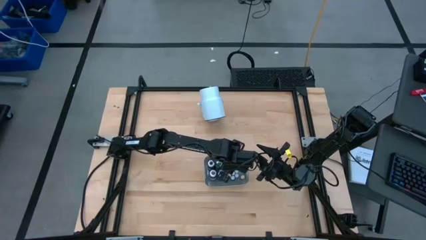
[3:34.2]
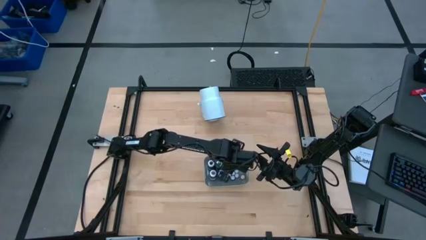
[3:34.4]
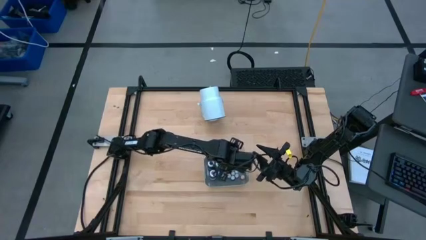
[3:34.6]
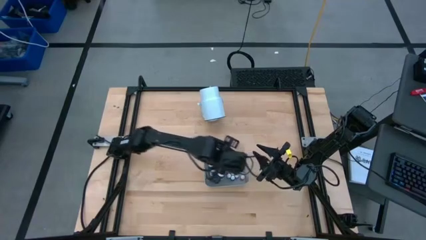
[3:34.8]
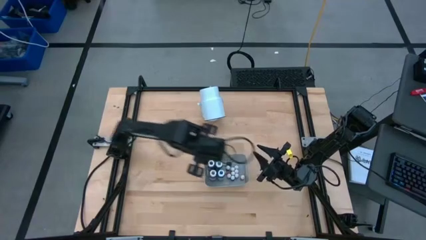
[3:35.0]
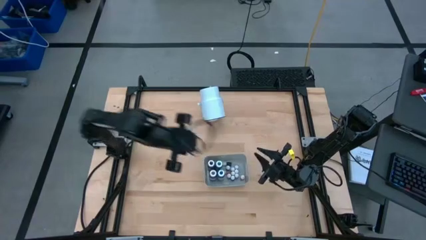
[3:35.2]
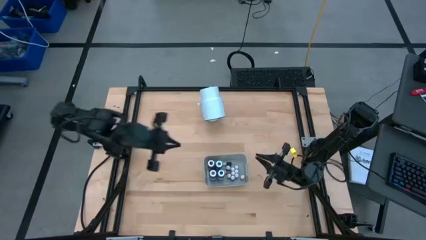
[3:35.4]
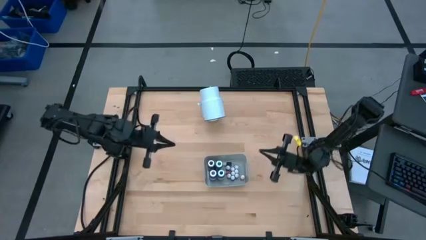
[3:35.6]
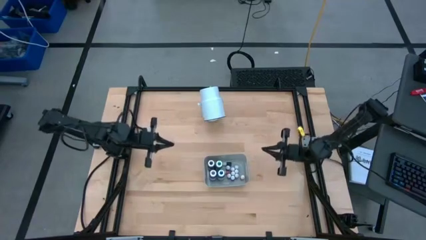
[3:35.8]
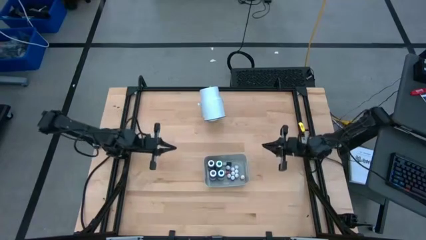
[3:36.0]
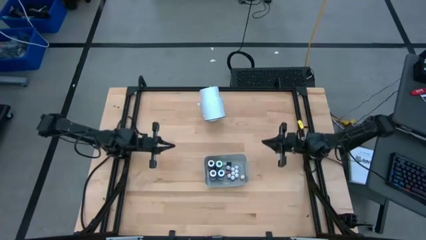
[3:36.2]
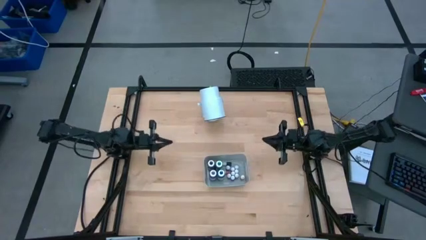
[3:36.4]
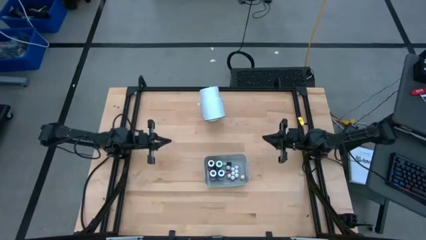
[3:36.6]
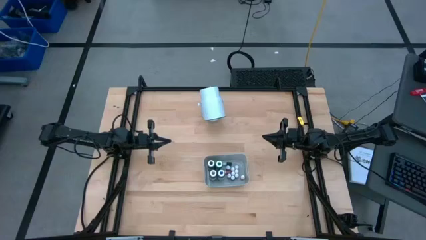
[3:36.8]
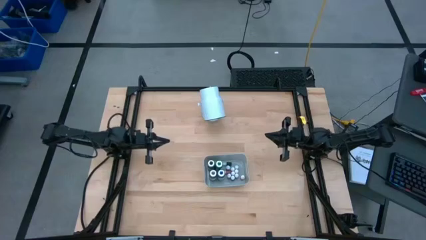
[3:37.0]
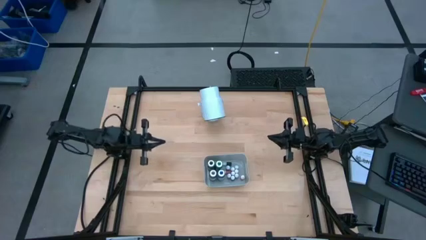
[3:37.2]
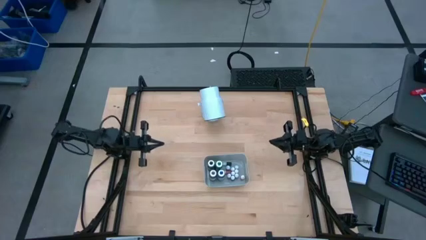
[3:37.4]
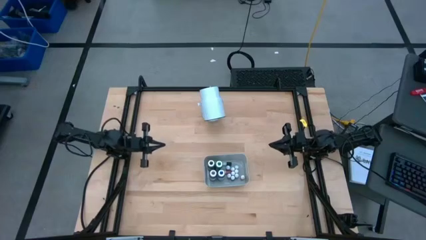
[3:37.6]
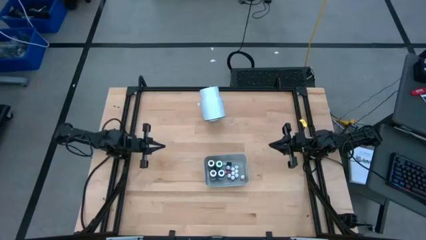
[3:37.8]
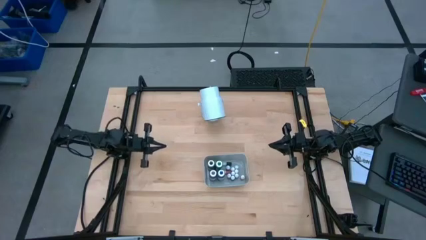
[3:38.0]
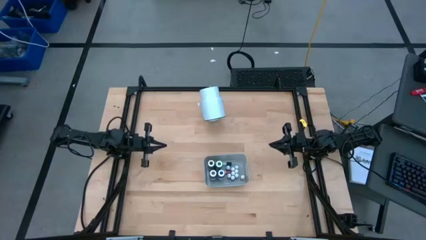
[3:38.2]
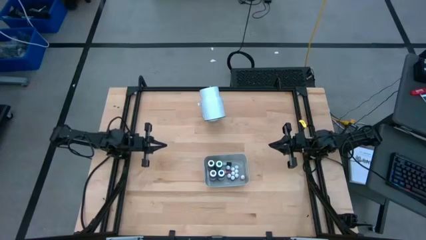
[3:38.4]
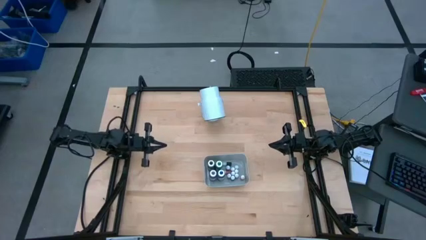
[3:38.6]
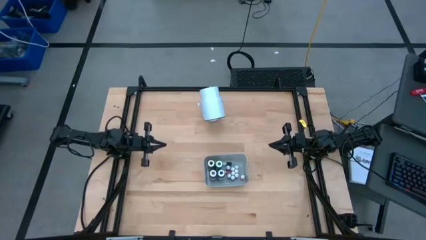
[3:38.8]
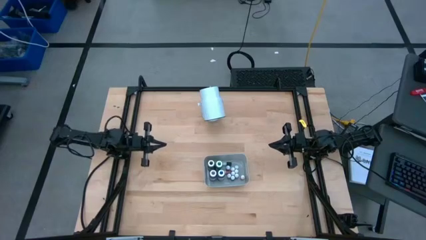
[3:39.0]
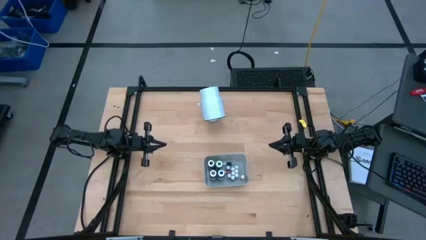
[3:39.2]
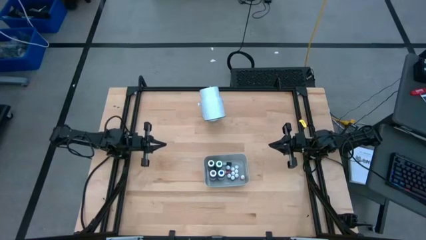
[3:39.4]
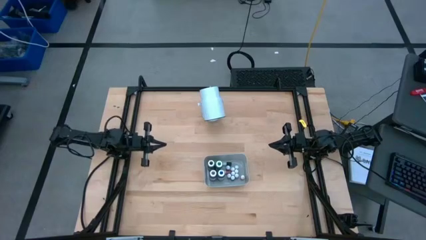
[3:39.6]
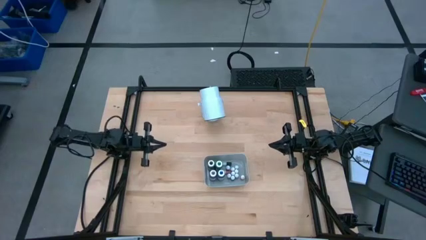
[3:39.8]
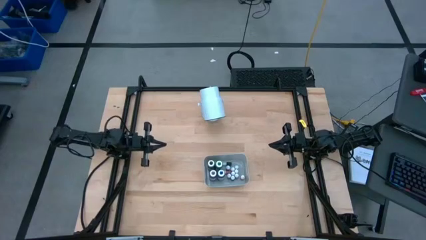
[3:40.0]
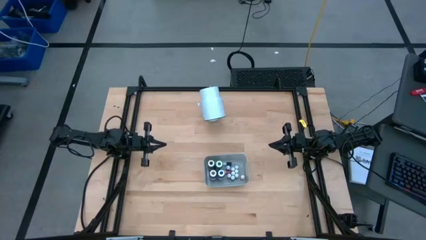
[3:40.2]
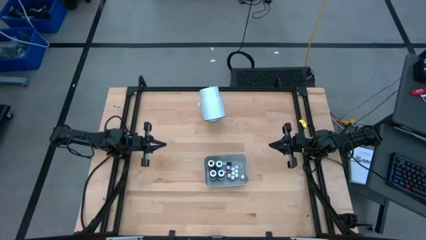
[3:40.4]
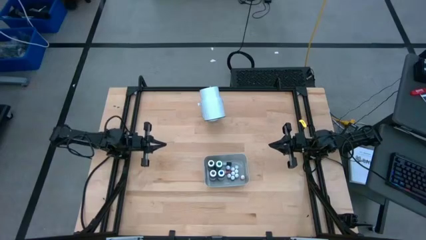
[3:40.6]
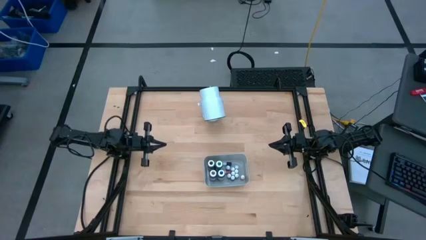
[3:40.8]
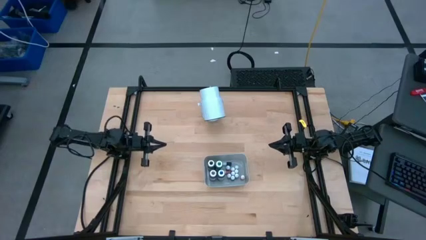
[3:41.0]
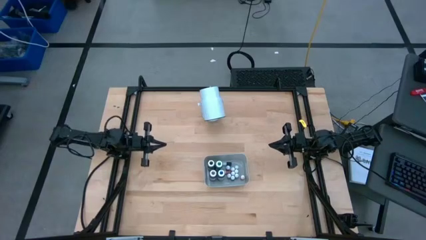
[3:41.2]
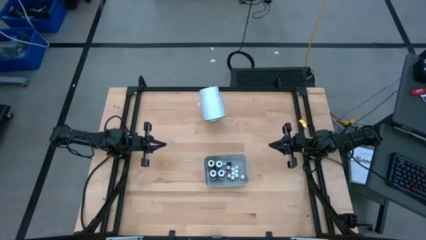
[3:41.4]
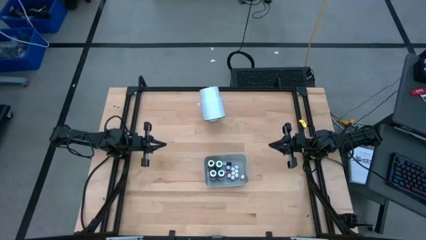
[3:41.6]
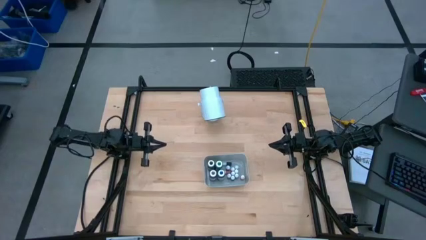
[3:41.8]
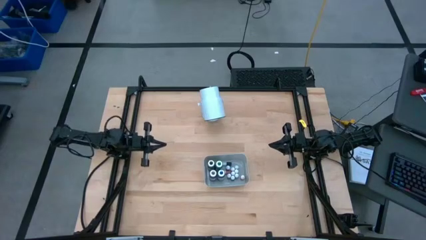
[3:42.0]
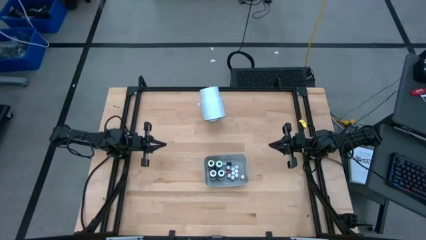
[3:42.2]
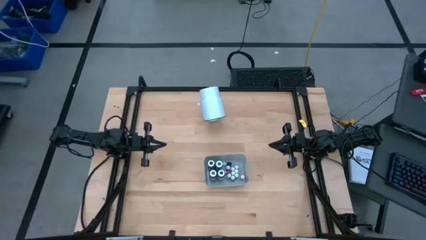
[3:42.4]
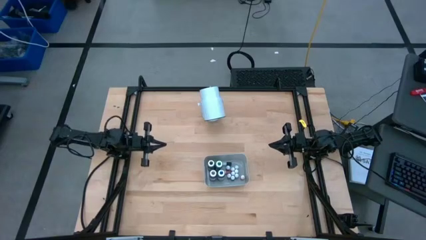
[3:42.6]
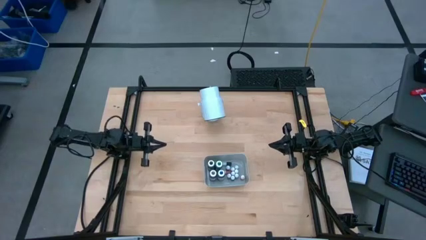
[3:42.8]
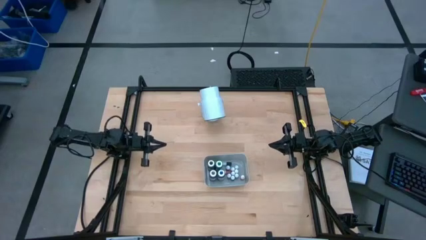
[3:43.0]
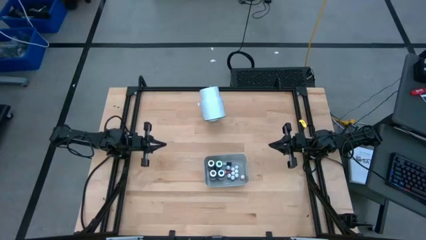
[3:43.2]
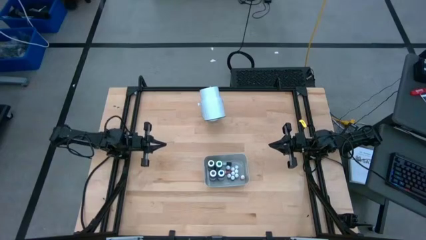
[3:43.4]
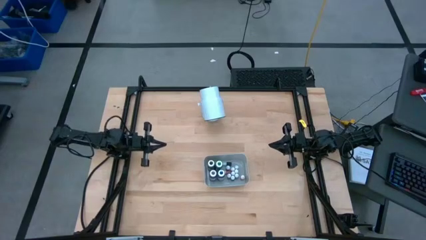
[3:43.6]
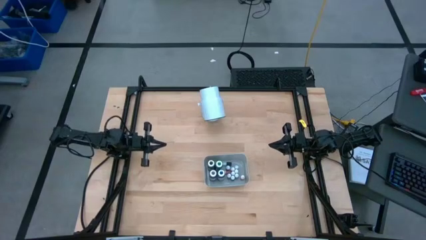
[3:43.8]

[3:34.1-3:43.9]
Task: Pick & Place food coloring
Return to Home Position

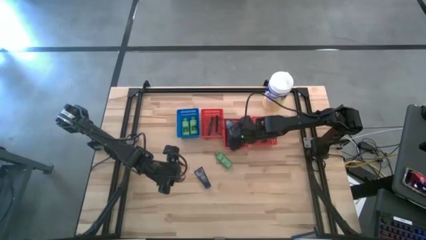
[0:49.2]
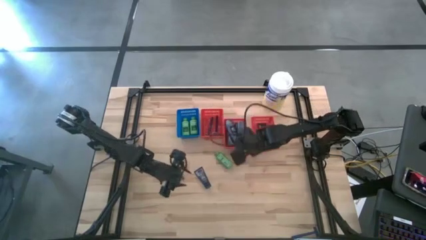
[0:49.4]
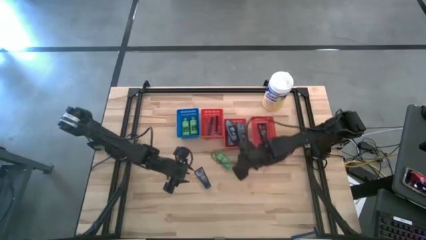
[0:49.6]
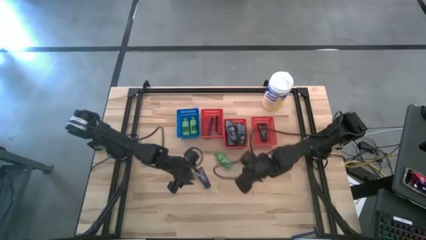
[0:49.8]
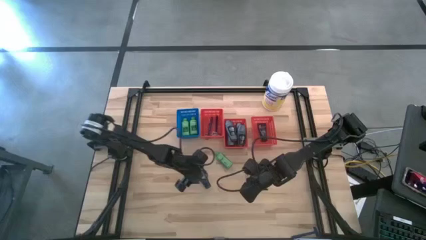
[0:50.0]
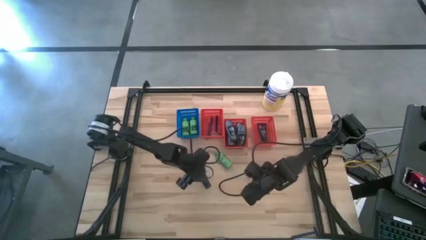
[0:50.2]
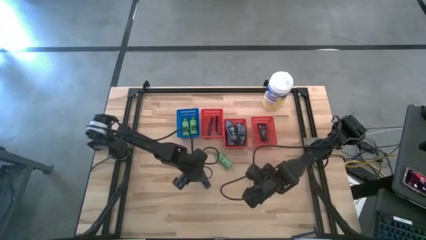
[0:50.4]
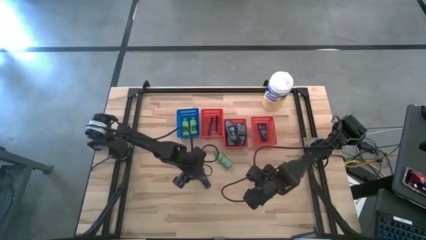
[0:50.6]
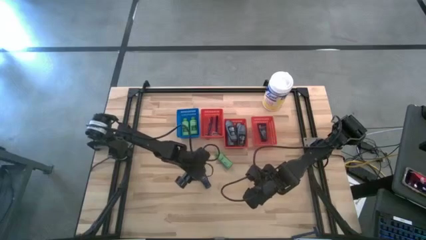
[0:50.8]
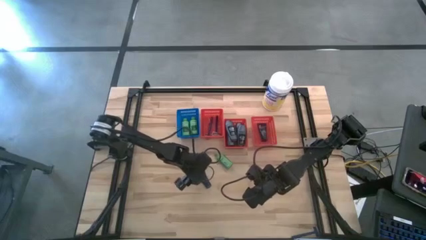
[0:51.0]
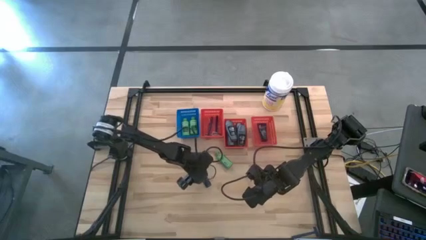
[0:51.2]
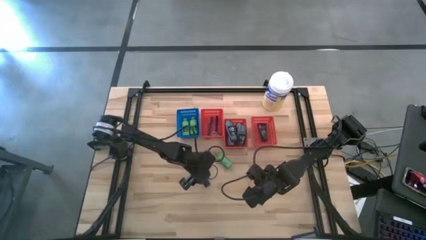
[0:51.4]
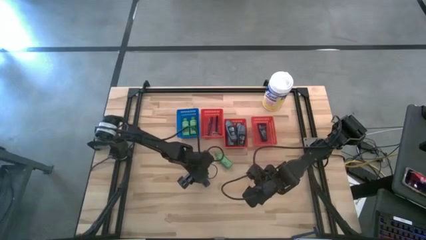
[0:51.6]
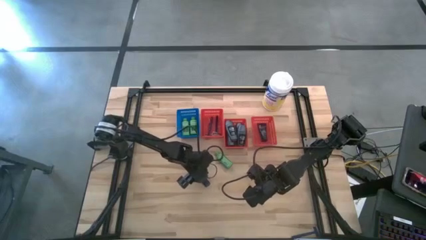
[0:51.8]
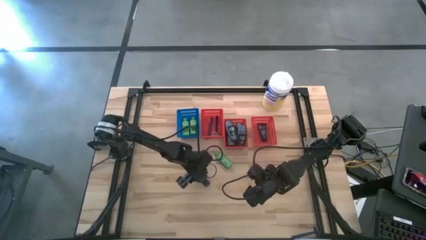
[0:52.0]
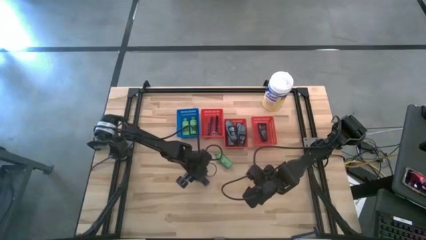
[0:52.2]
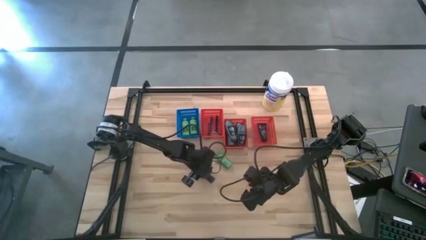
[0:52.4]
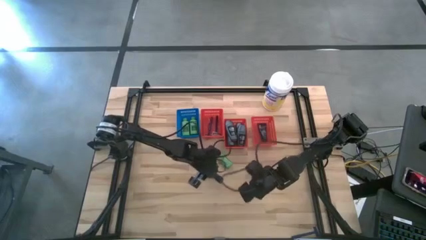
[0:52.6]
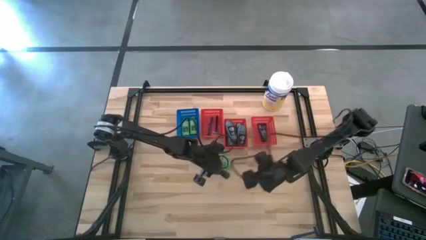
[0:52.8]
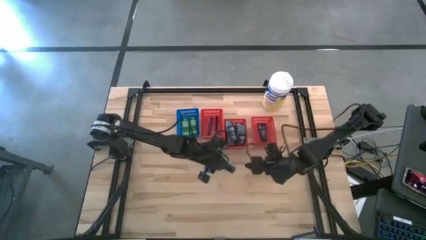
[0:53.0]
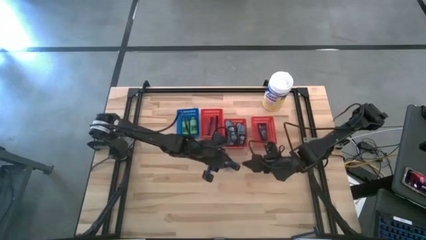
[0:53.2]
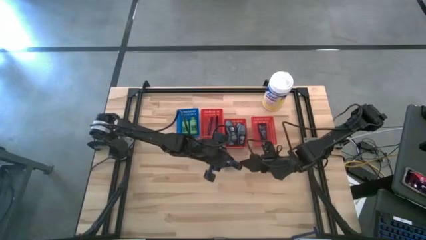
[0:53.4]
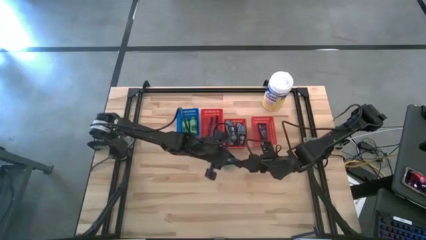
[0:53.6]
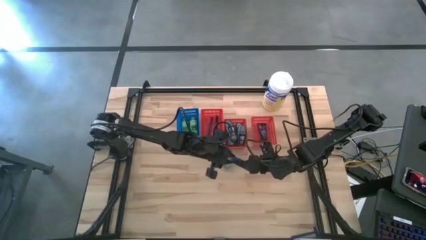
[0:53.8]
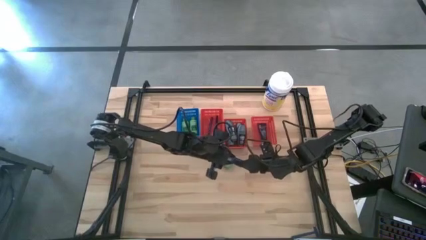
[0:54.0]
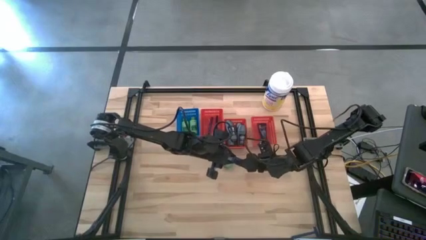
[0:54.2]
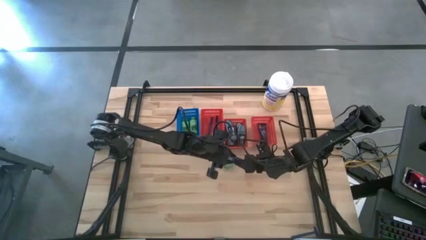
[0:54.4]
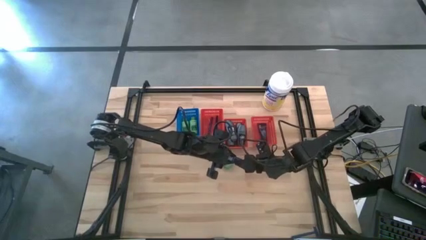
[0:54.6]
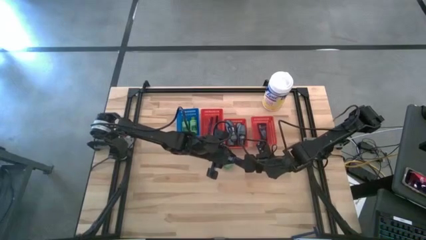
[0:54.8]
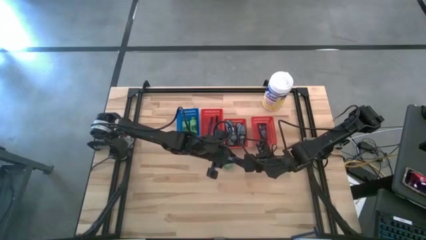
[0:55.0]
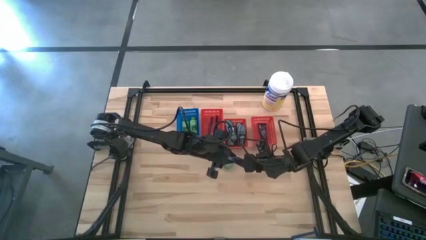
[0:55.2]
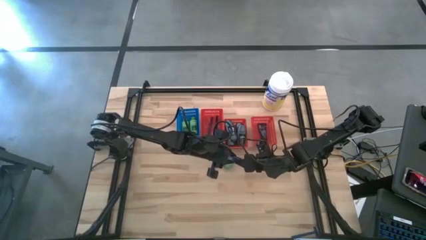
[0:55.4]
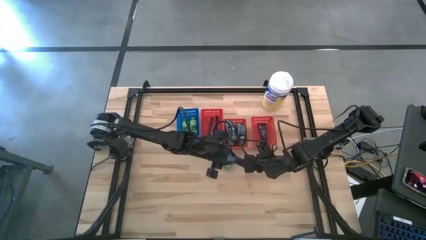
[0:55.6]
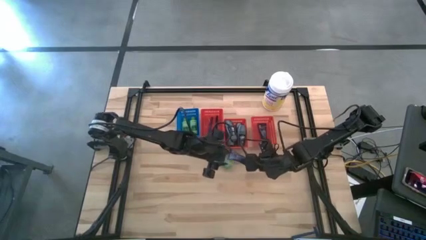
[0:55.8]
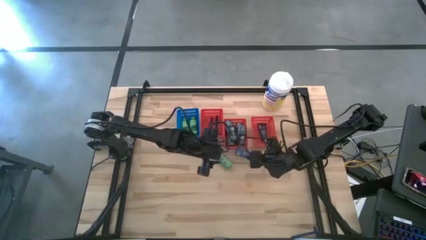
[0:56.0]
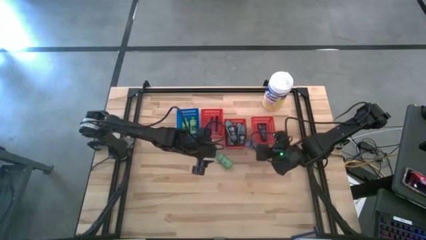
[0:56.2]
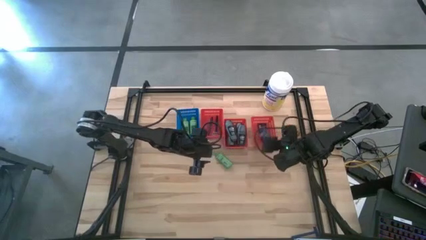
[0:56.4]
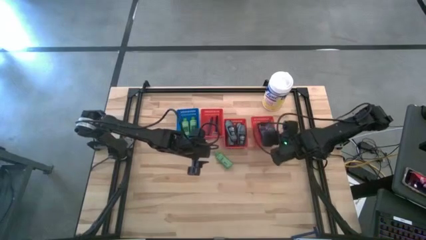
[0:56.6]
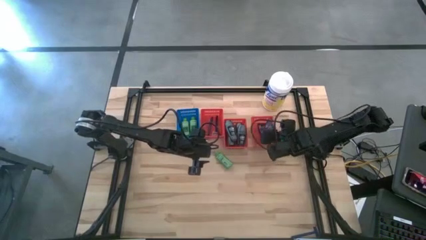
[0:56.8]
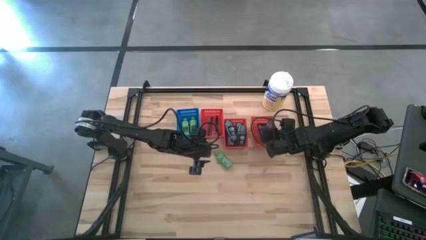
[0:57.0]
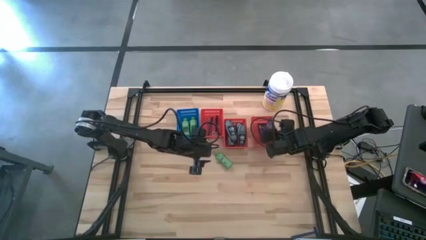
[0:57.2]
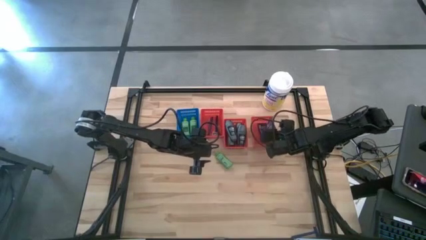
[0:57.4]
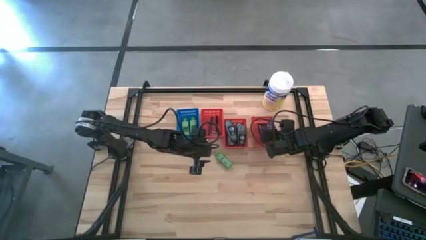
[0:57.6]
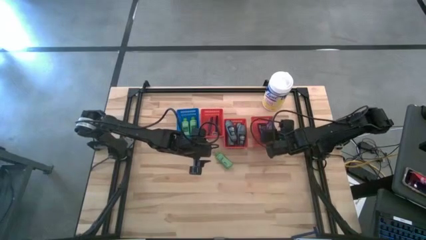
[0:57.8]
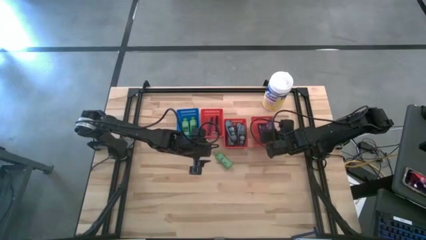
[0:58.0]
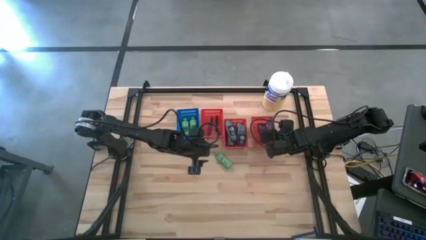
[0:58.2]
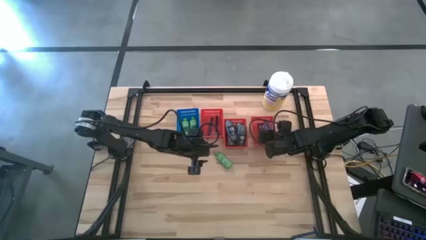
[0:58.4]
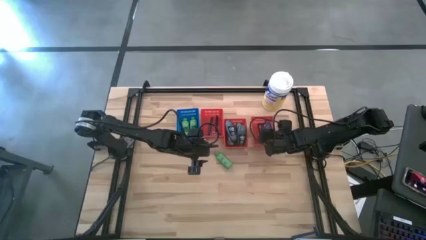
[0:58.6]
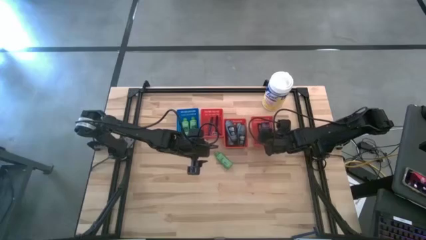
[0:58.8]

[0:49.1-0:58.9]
Task: Pick & Place Travel size toiletries
Put the dark blue shave cream into the right red bin
